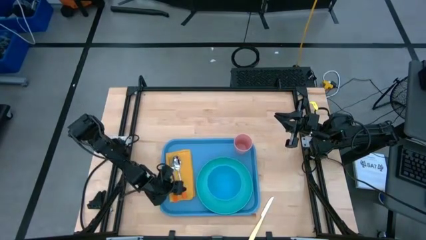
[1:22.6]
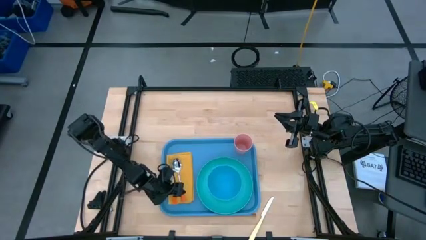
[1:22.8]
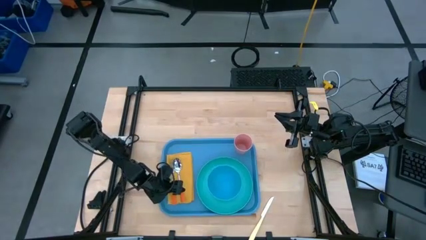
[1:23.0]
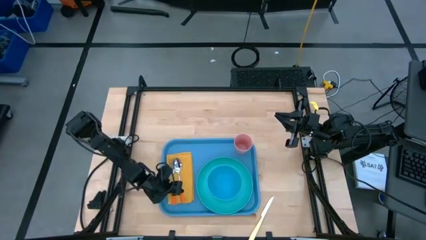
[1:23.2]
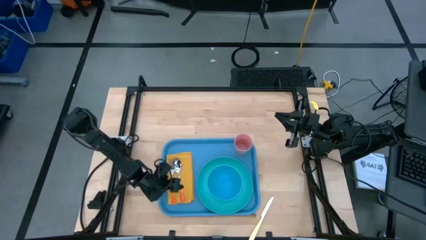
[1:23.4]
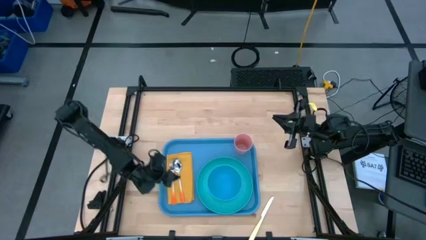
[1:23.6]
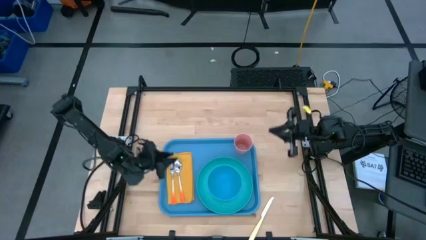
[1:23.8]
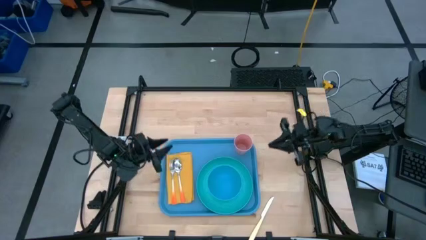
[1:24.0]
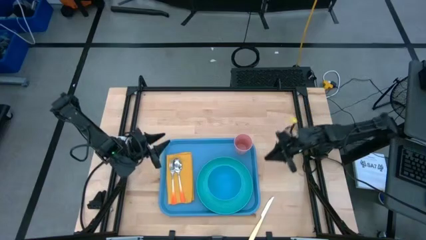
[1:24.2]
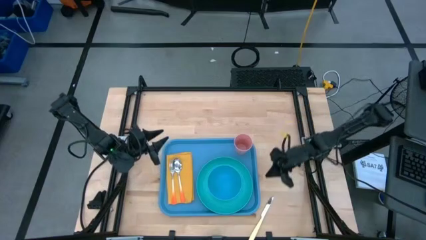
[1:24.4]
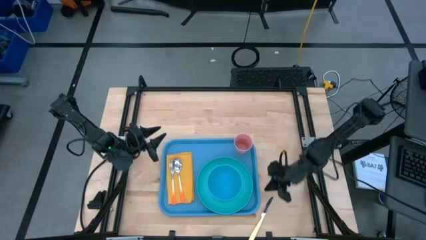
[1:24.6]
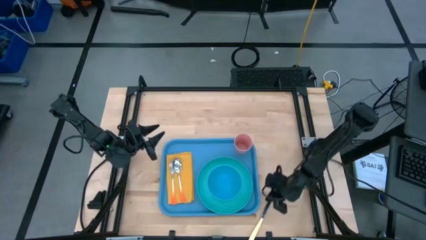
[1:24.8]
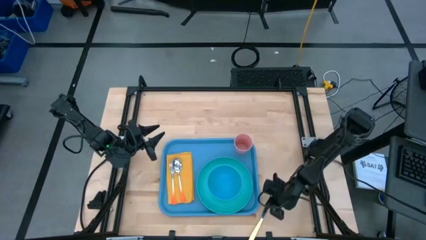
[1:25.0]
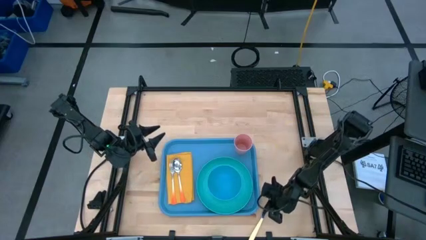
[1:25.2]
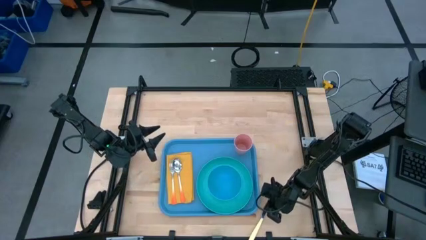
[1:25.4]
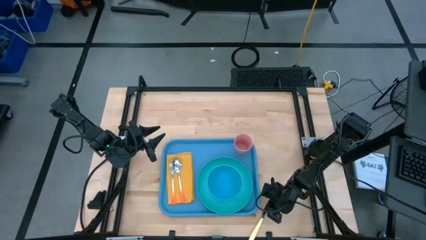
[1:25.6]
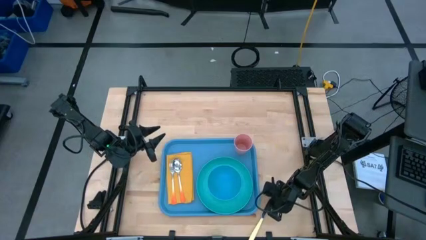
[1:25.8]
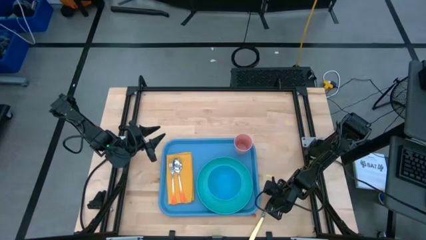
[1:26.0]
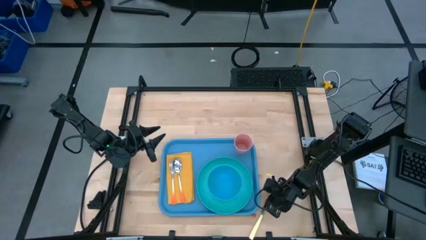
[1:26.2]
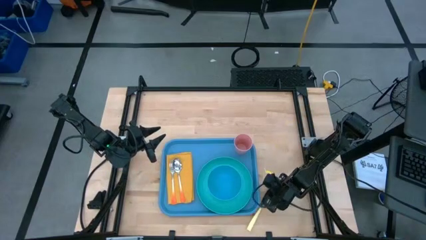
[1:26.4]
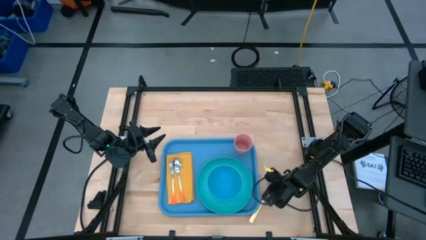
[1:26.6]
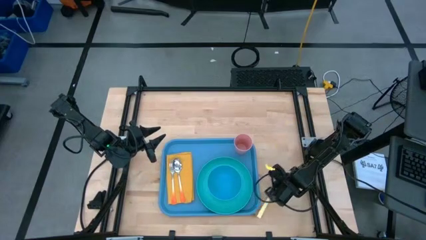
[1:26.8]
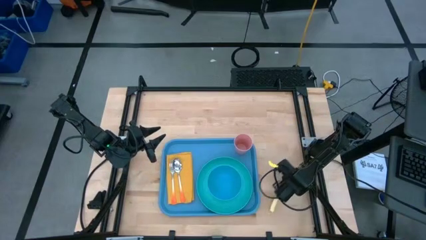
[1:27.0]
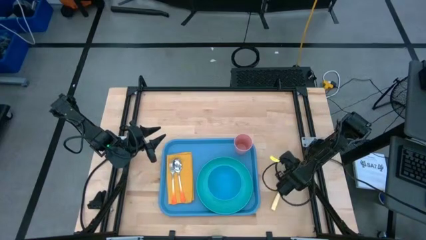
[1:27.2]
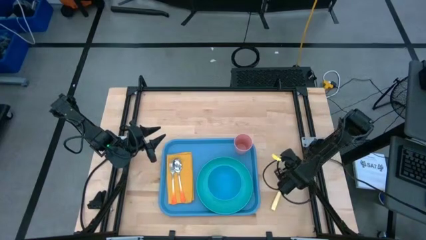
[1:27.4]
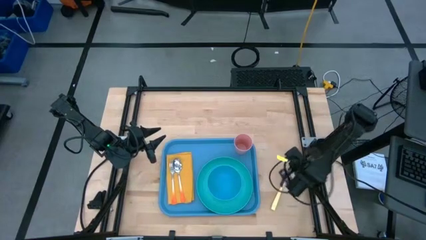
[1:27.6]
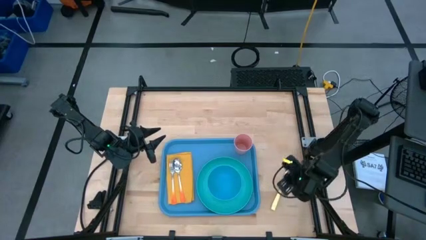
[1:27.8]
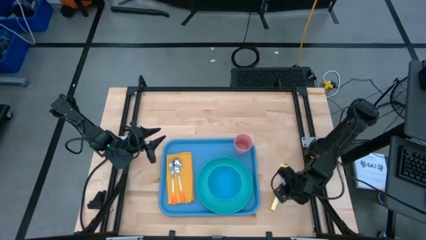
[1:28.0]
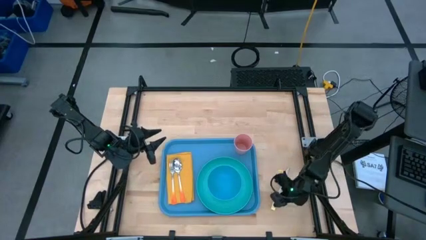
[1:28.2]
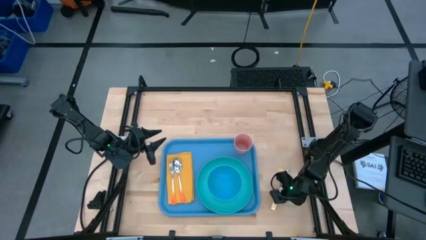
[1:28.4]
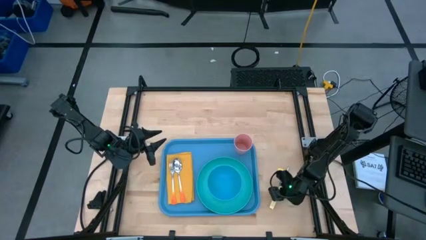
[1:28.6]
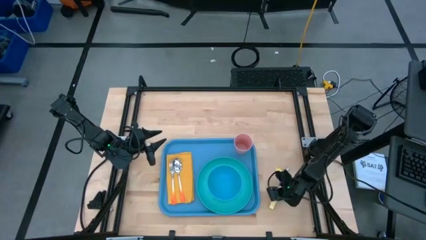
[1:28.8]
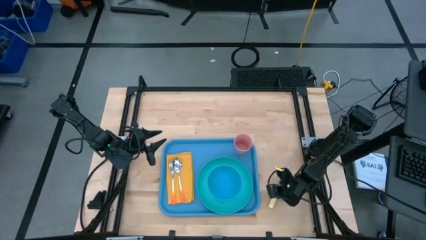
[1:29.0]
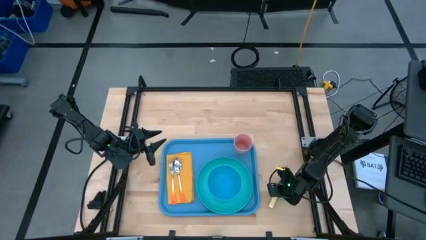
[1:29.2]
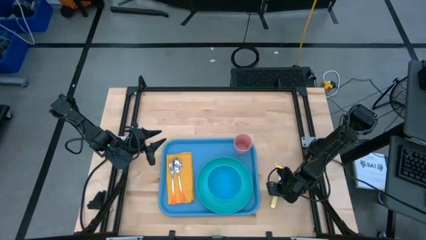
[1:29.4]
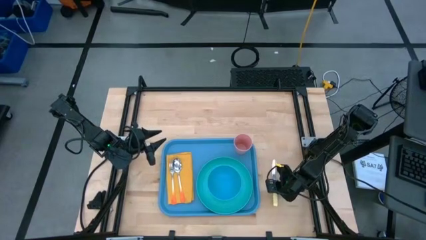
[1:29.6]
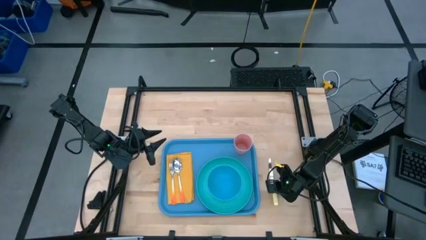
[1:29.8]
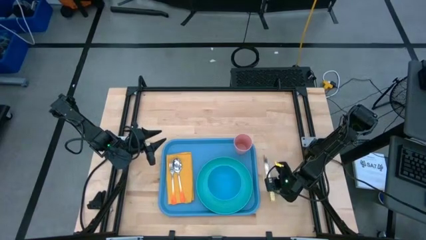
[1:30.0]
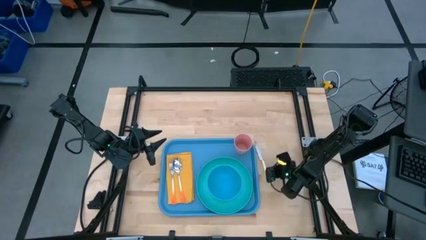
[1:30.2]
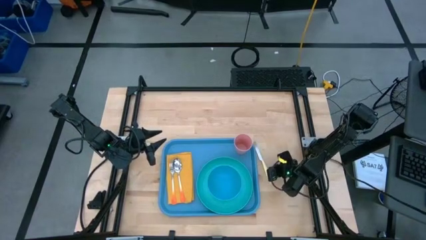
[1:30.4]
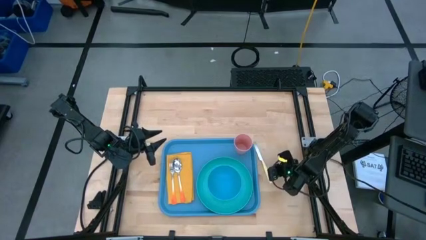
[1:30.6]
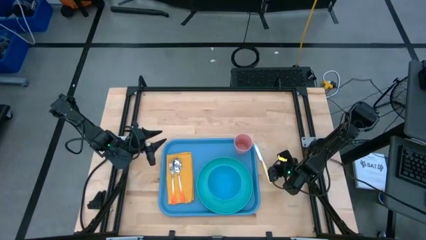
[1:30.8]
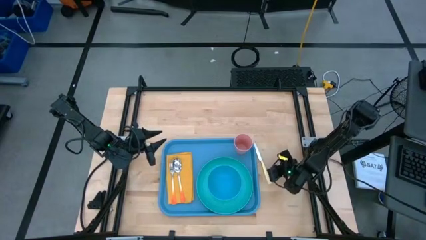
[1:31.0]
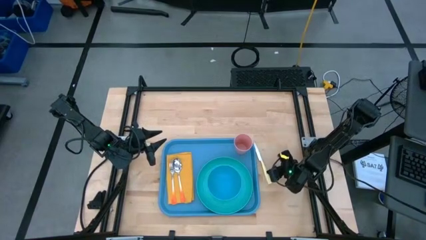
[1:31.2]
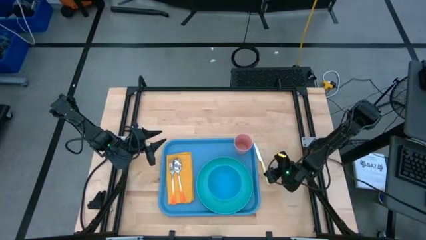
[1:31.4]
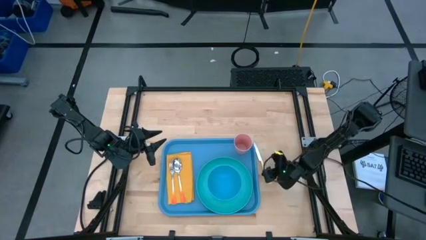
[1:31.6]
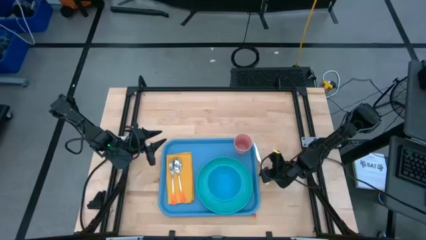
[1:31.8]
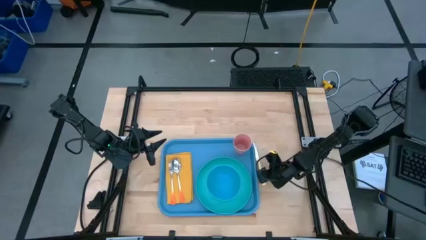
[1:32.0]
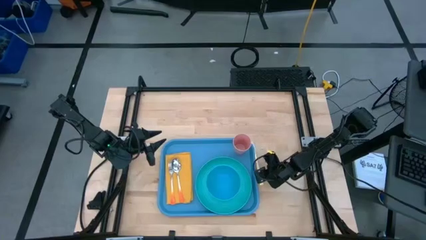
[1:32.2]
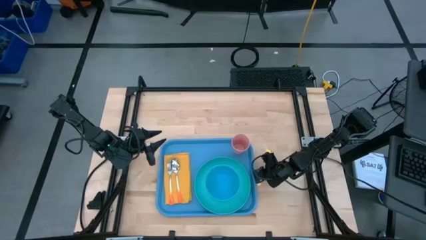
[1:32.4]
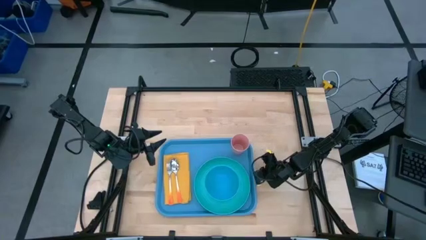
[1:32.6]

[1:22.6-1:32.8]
Task: Set up tray
Put the yellow table knife on the yellow napkin to the right of the orange spoon
